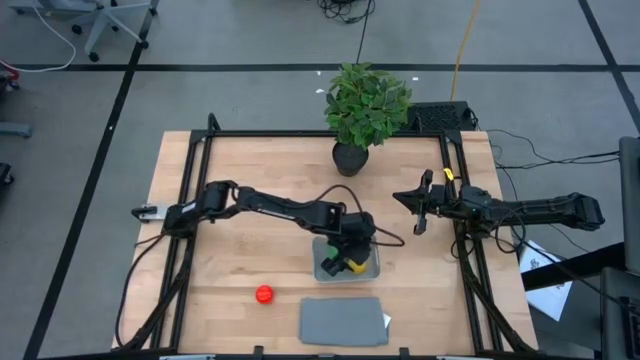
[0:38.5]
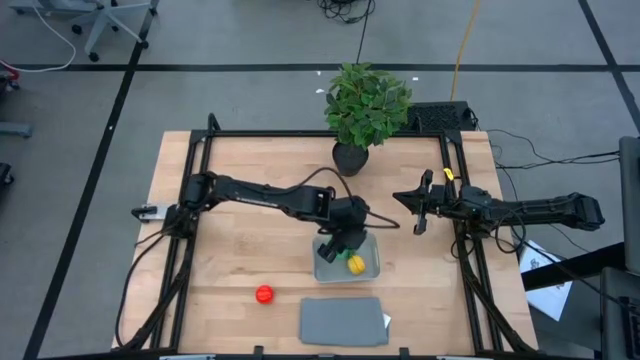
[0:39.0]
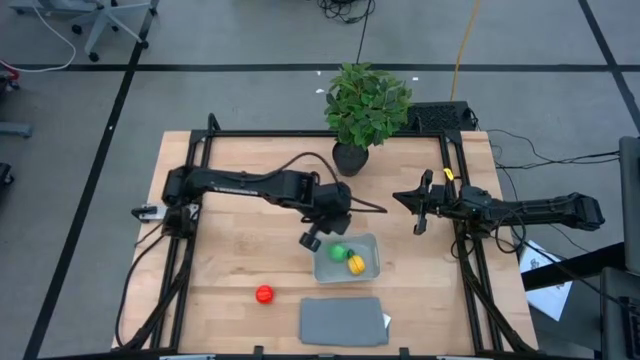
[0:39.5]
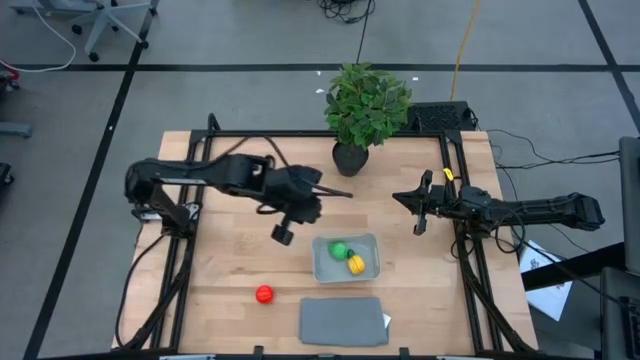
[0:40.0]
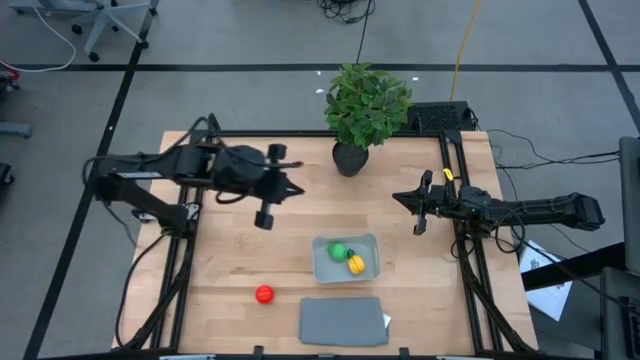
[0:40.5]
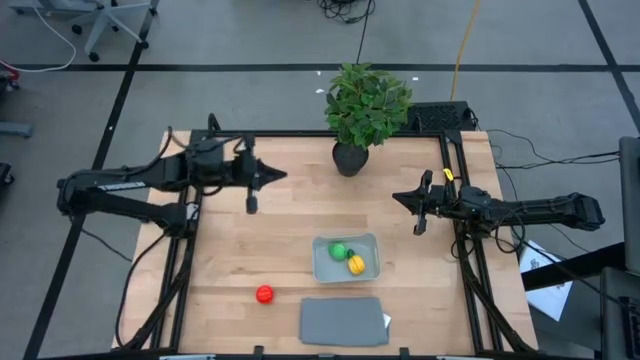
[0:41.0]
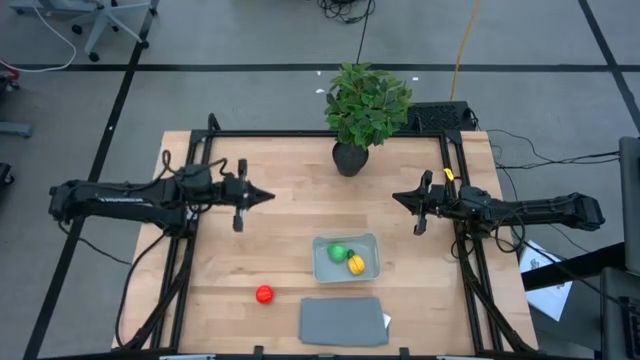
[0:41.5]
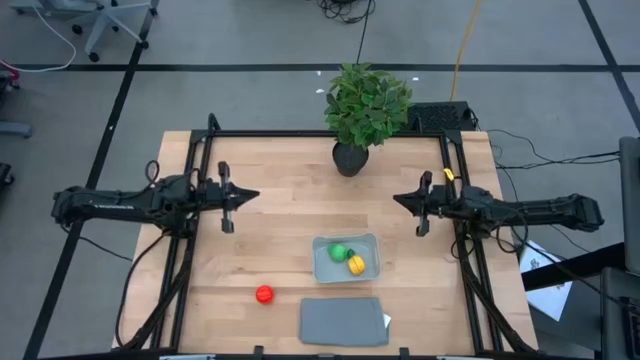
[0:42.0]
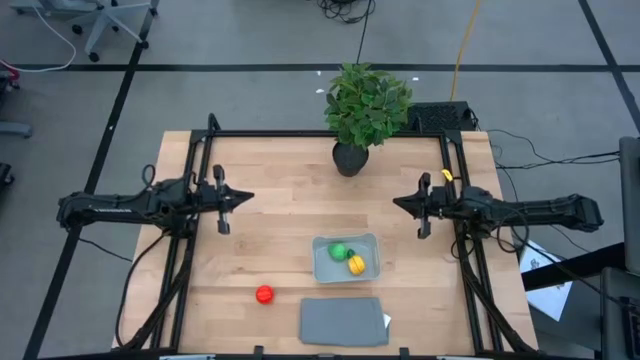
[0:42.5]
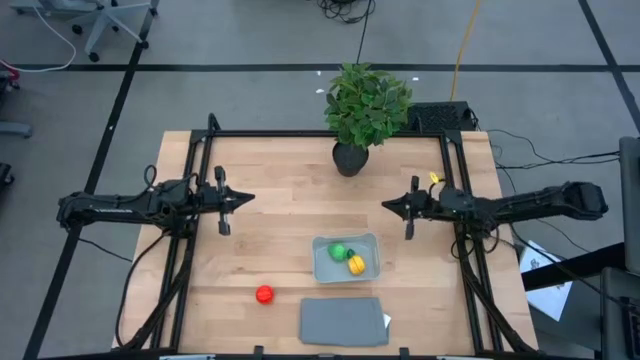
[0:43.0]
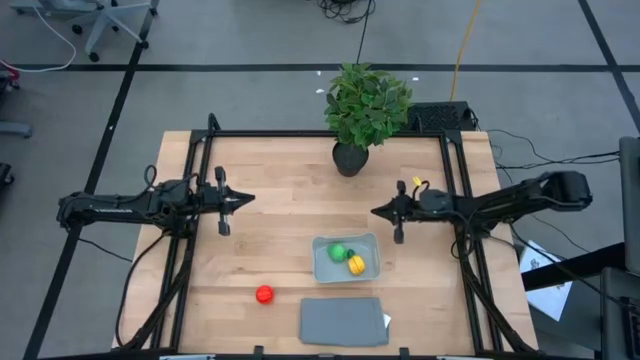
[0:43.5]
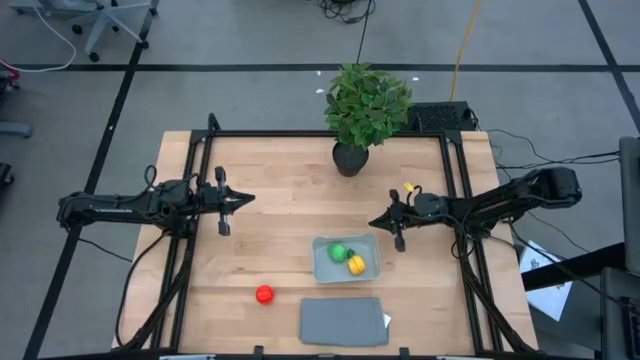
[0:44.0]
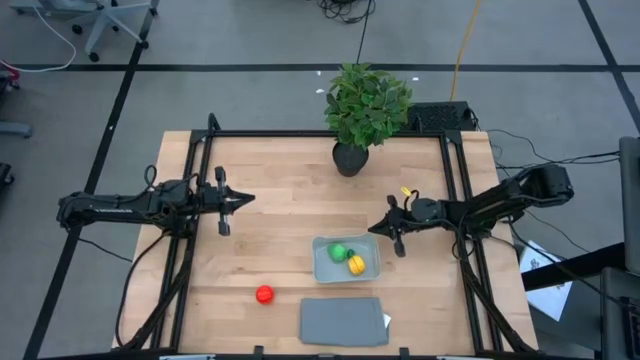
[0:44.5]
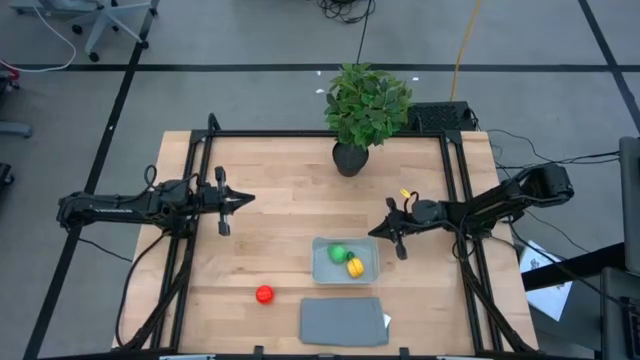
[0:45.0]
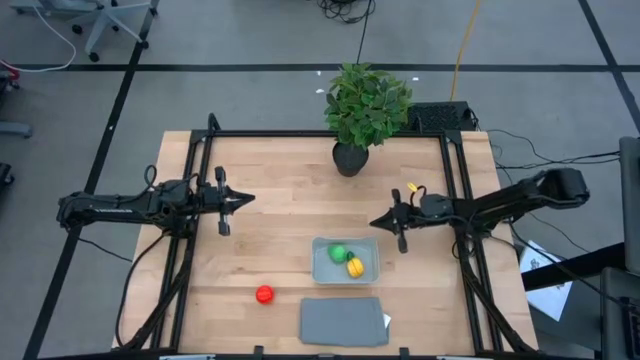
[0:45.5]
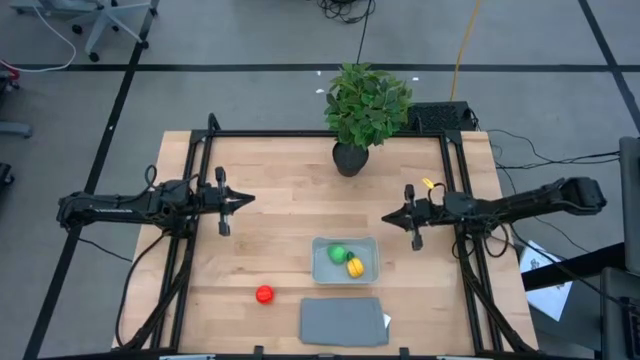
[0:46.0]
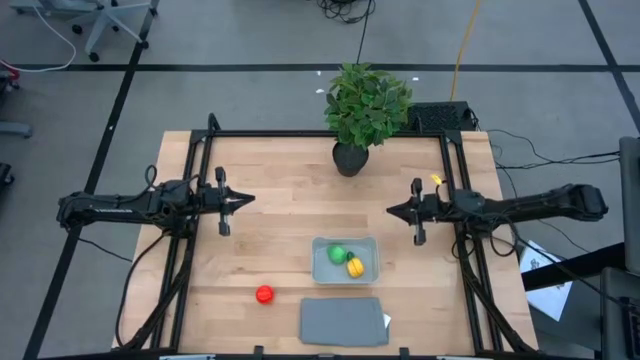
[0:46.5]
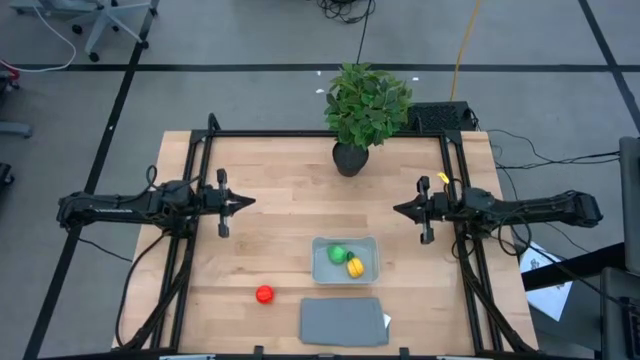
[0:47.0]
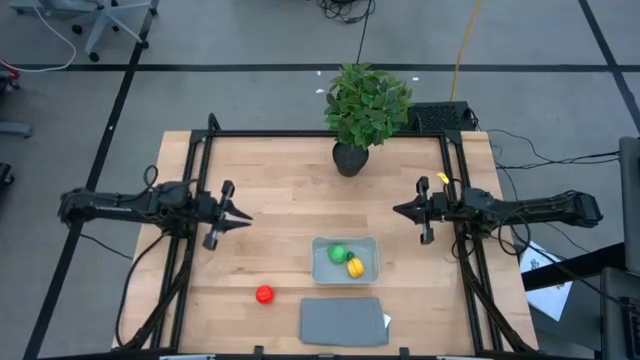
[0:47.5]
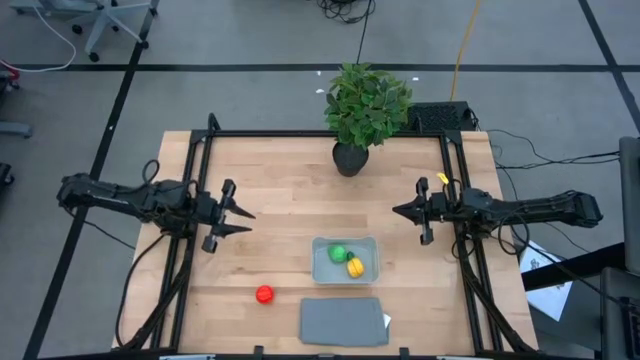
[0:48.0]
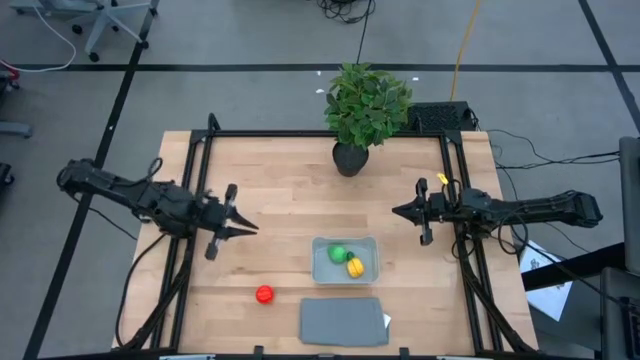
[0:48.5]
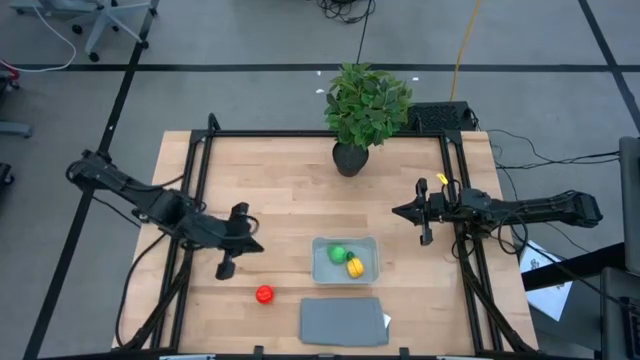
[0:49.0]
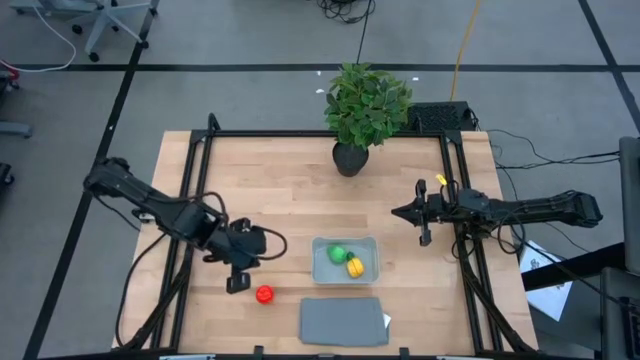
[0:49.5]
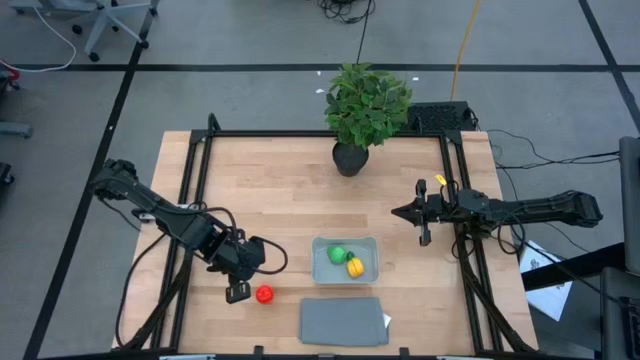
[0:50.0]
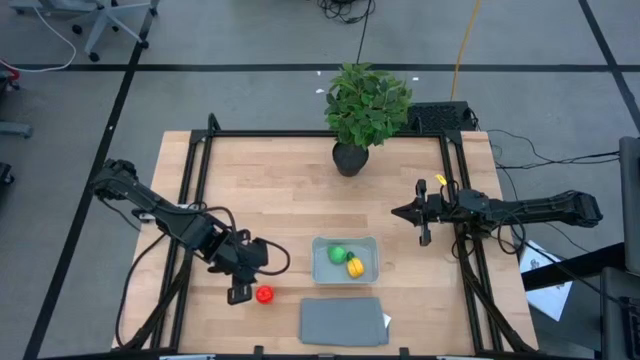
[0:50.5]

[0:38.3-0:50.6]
Task: Pick and placing Produce into tupperware
Put the tomato into the bin

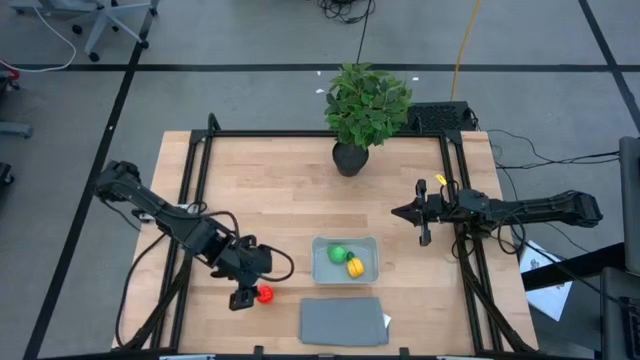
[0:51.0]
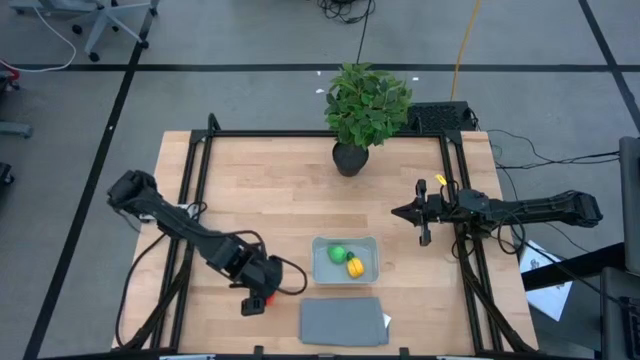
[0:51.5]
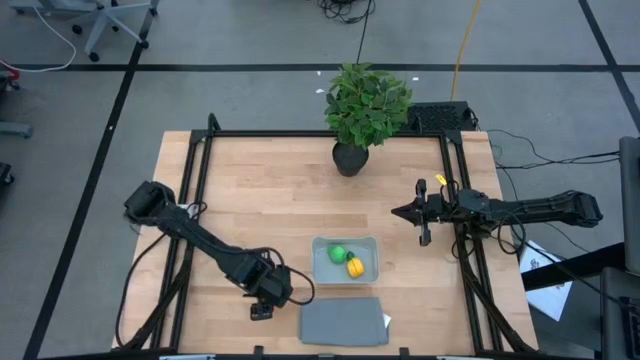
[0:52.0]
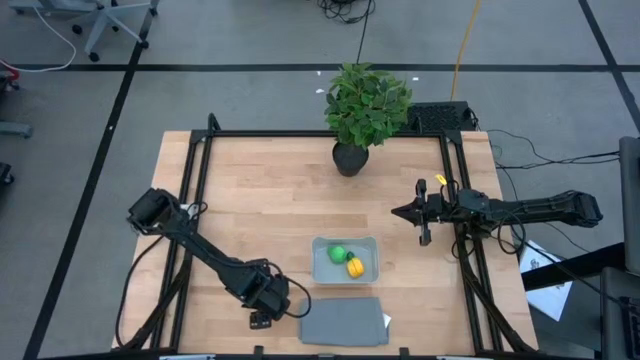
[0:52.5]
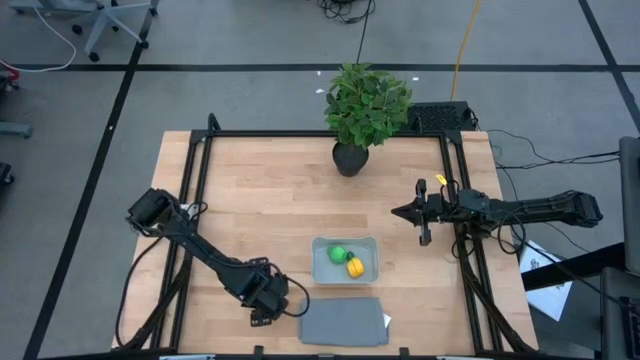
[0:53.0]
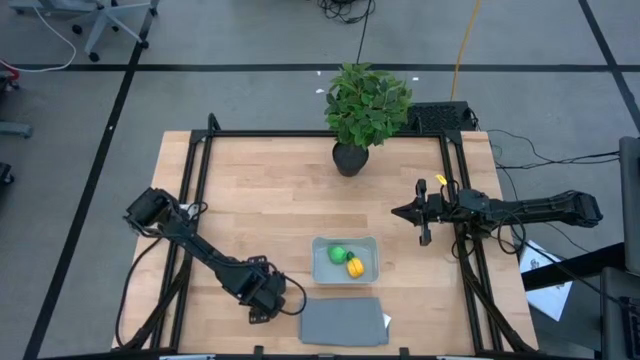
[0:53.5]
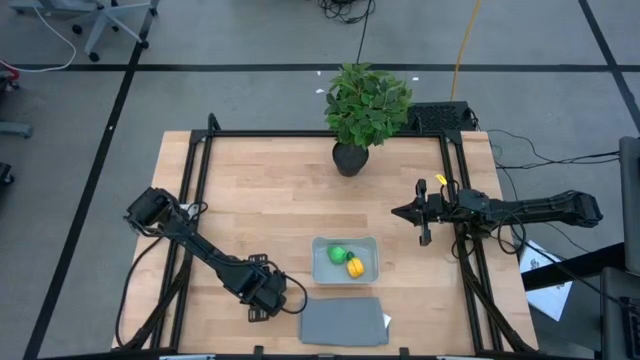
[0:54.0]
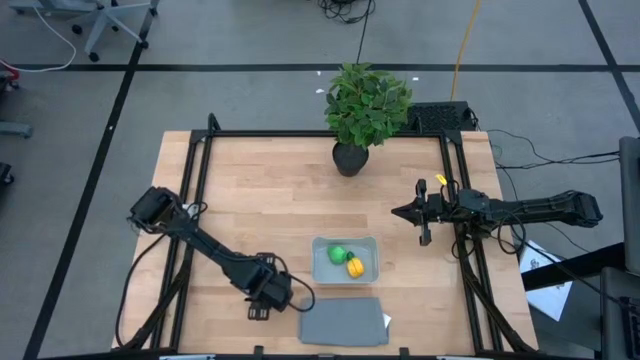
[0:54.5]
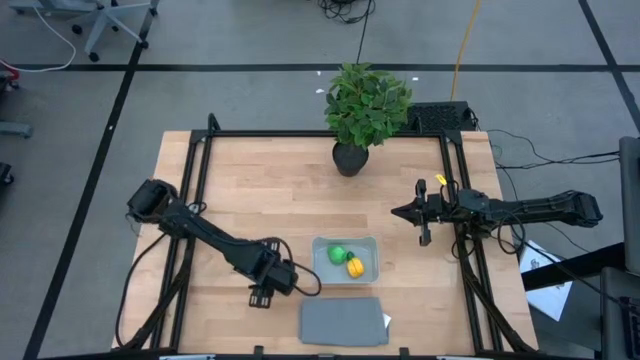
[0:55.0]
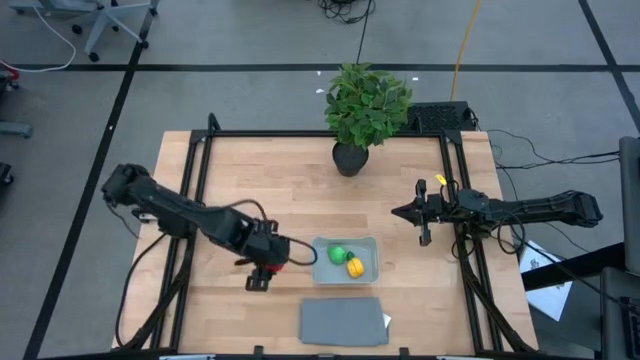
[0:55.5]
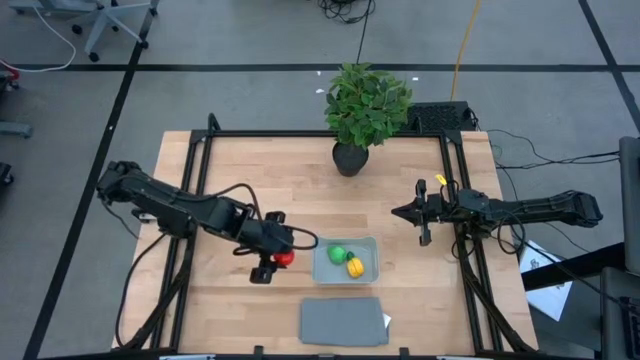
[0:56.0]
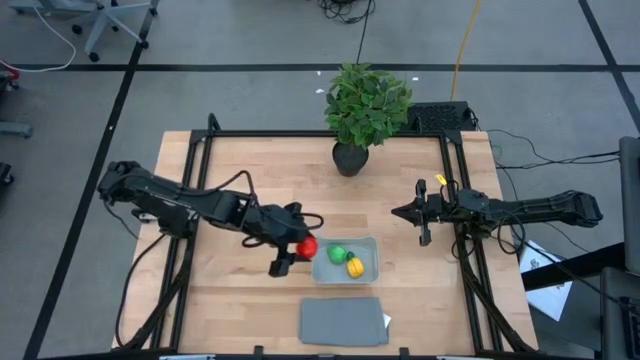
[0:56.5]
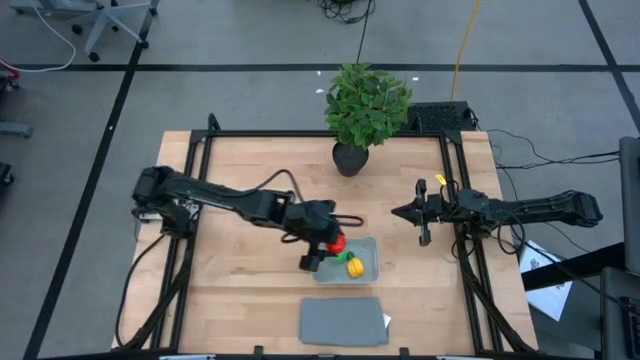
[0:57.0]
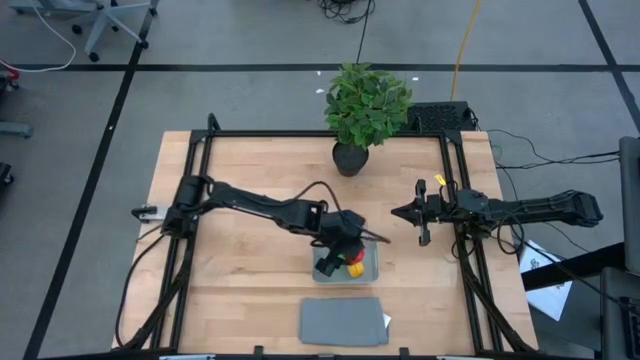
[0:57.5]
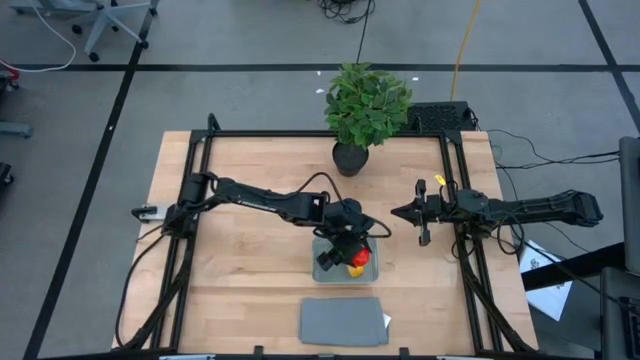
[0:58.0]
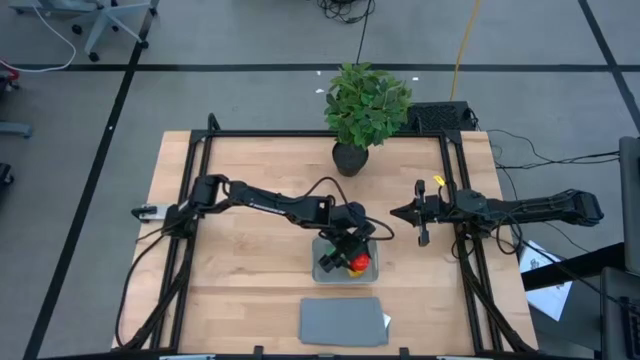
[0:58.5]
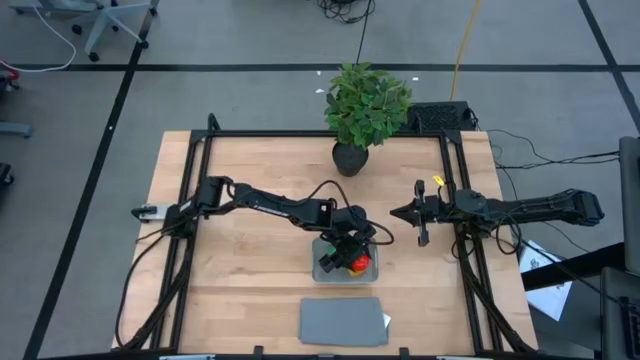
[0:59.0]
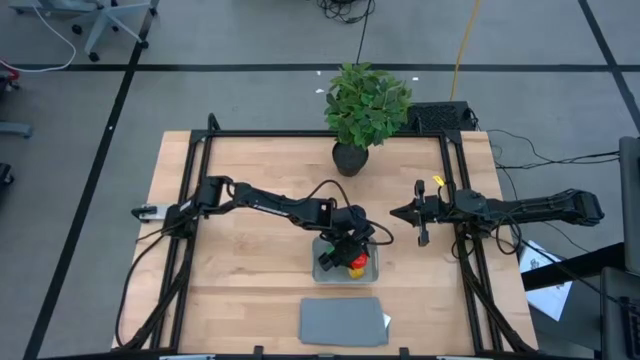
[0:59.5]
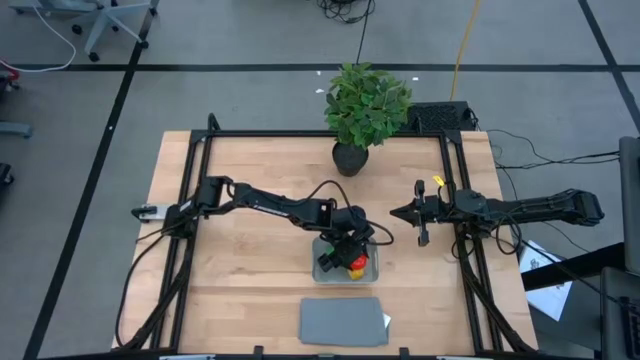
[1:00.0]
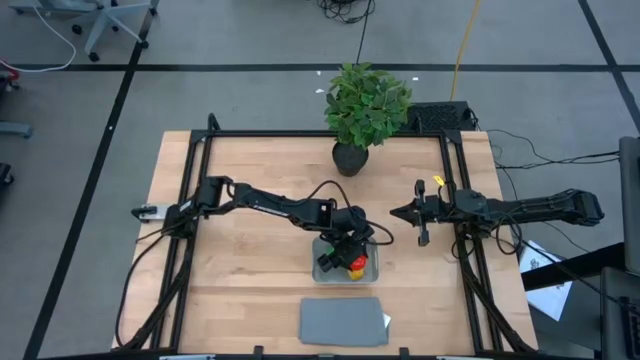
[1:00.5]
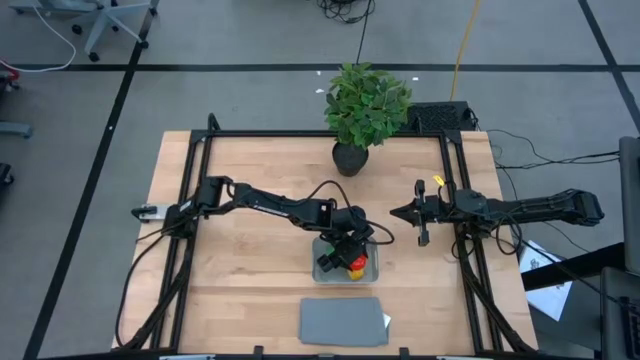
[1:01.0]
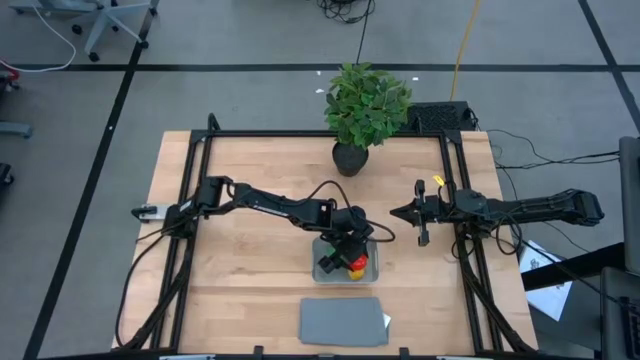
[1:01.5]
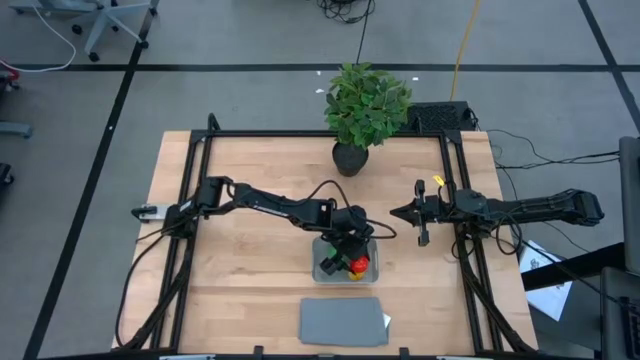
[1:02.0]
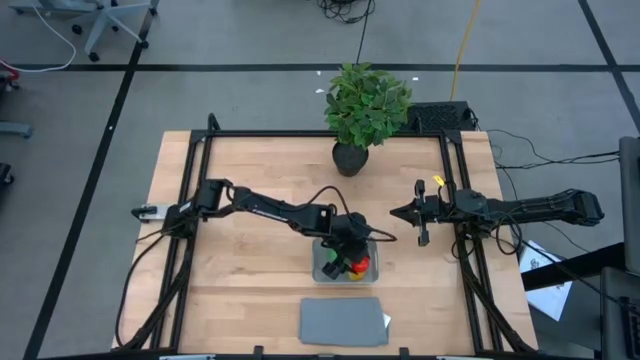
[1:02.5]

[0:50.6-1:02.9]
Put the tomato into the bin
